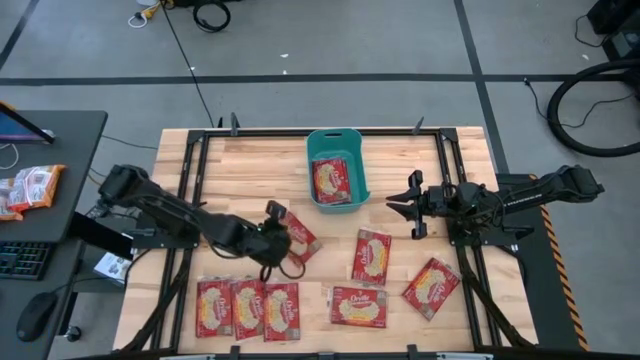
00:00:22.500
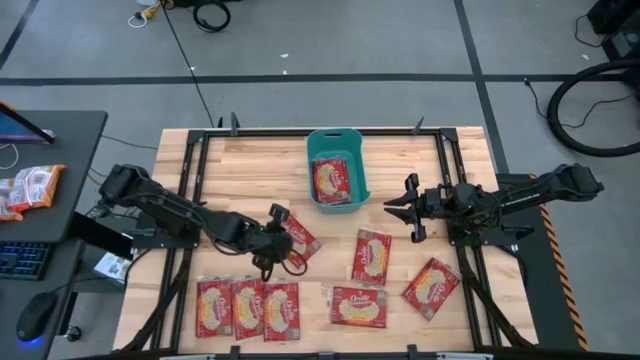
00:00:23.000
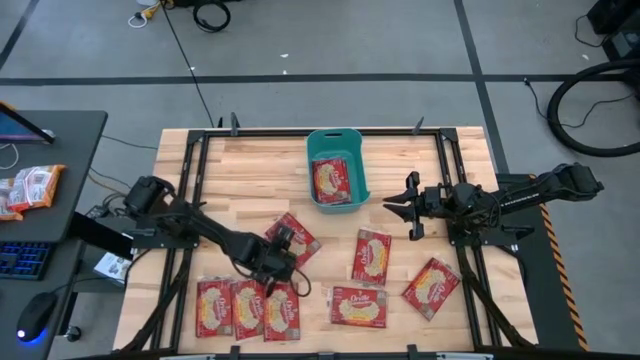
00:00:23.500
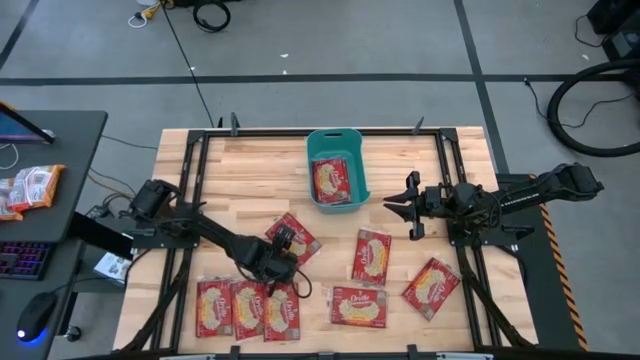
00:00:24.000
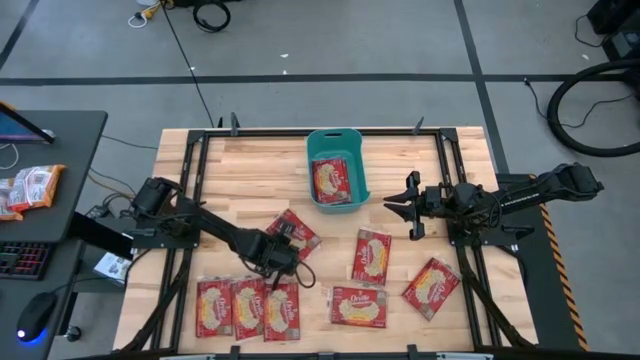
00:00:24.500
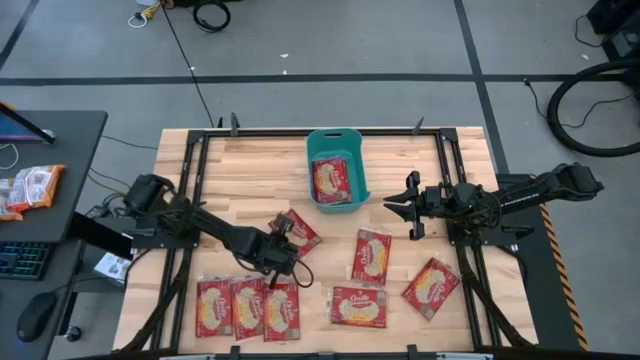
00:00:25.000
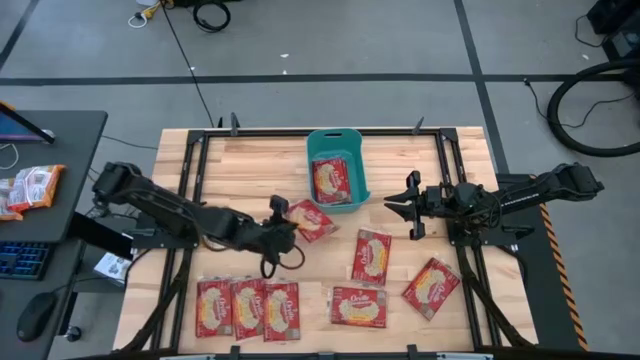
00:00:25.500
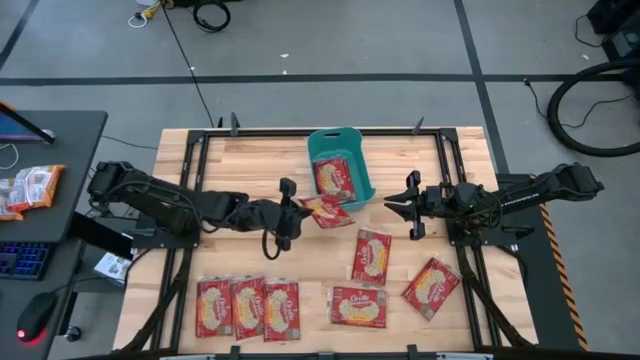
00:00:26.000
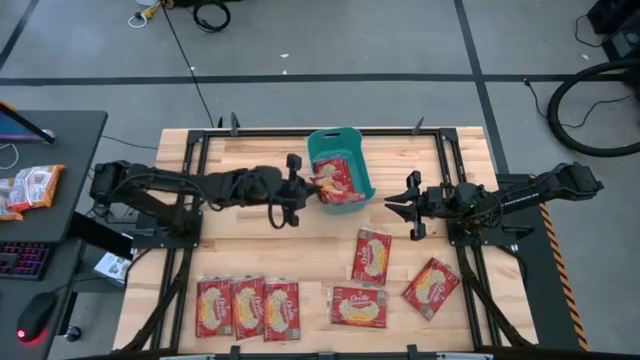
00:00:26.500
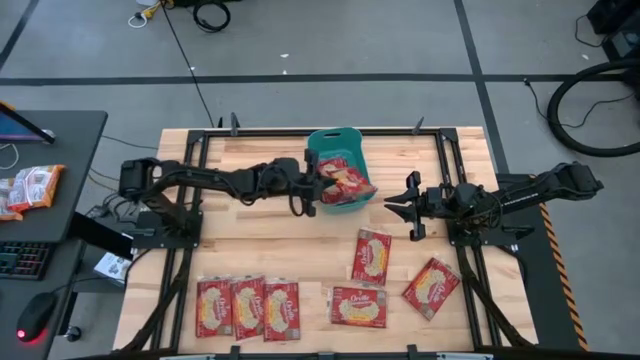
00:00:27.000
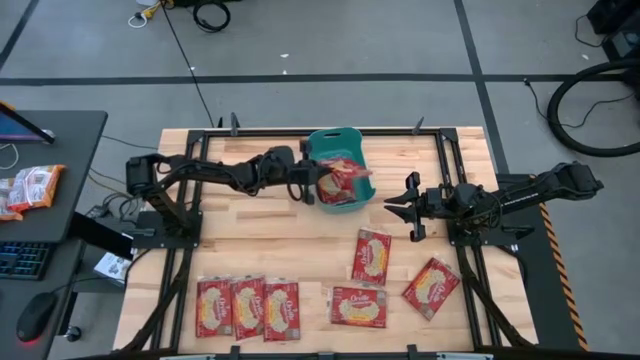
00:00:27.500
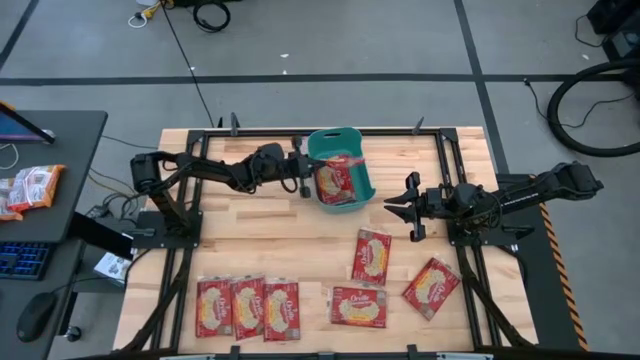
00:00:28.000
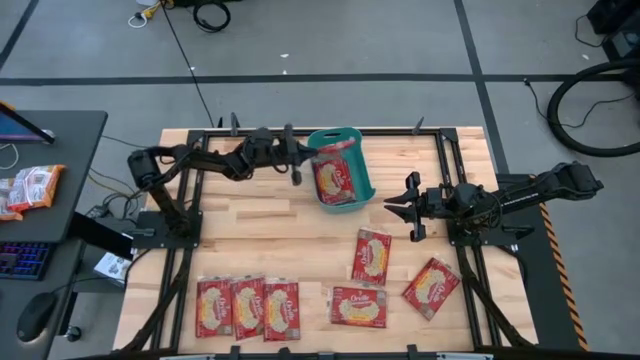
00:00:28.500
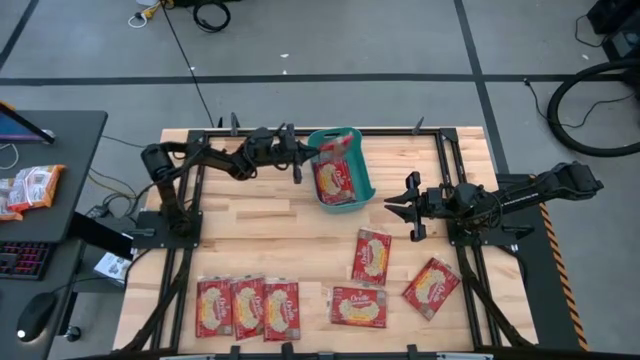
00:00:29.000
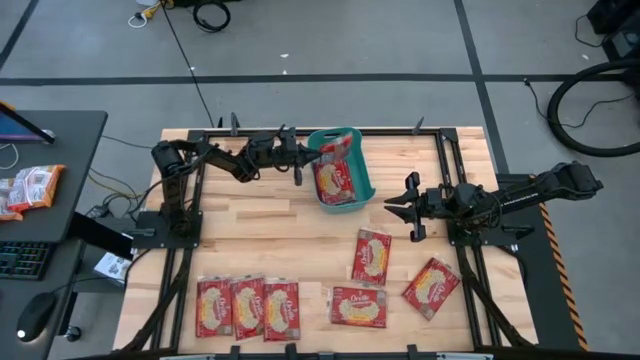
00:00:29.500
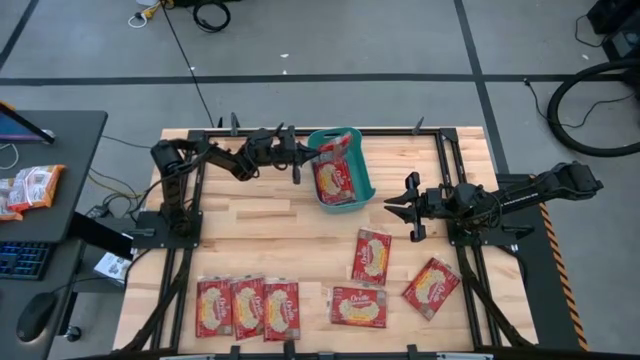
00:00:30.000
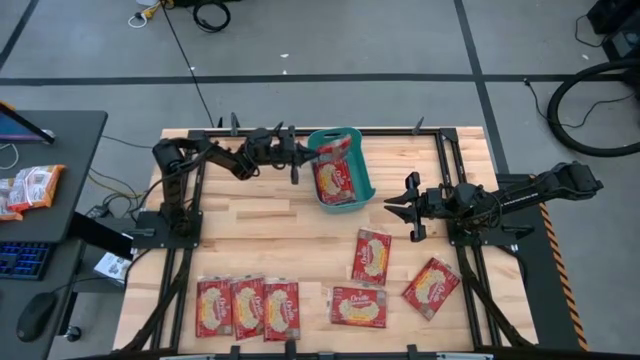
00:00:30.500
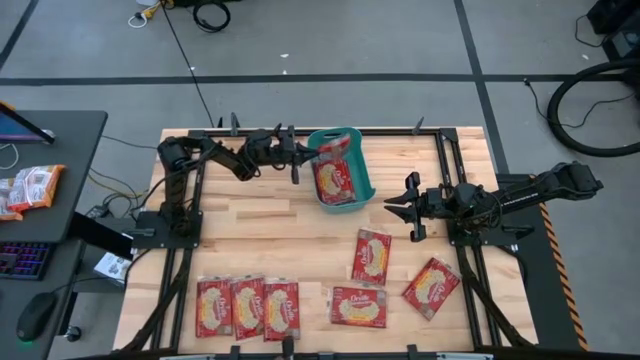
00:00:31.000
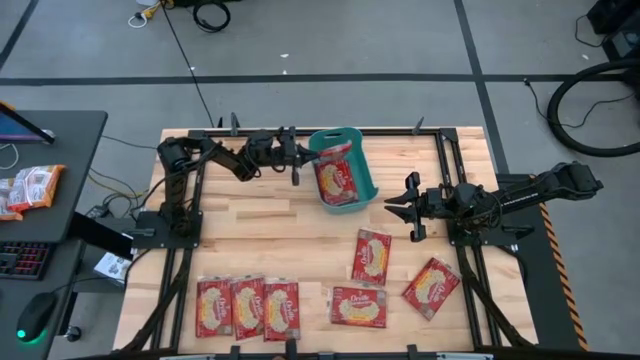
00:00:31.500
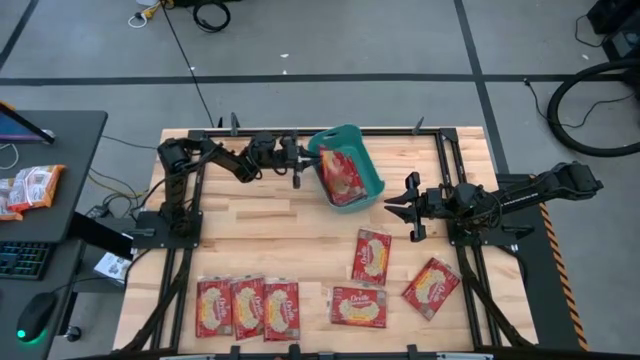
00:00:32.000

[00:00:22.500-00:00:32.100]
Task: Sort popcorn bags into baskets
Put the red popcorn bag into the green bin

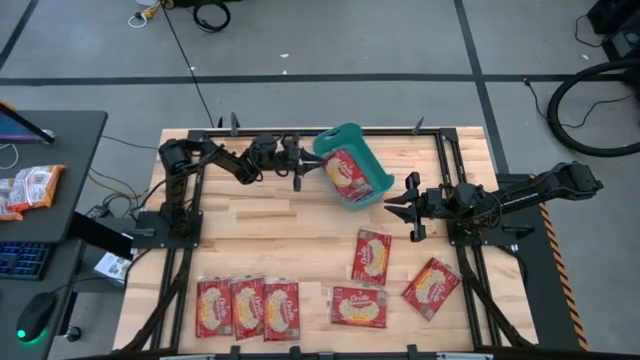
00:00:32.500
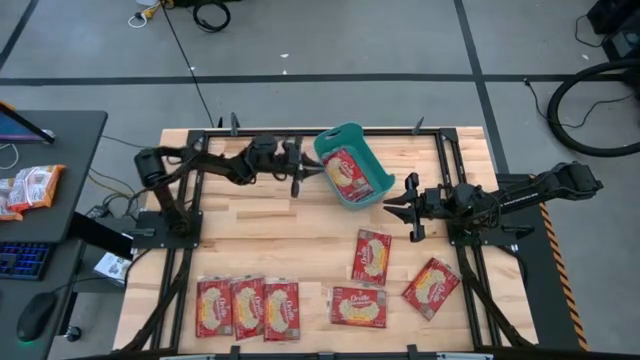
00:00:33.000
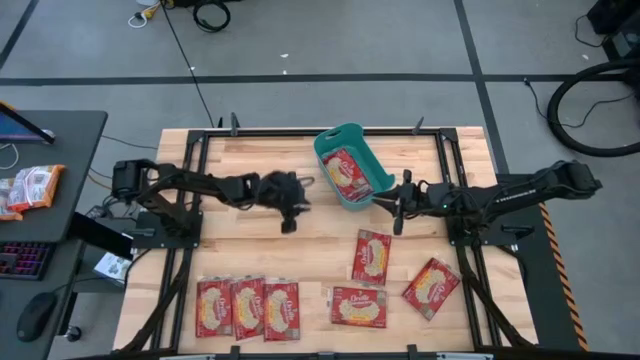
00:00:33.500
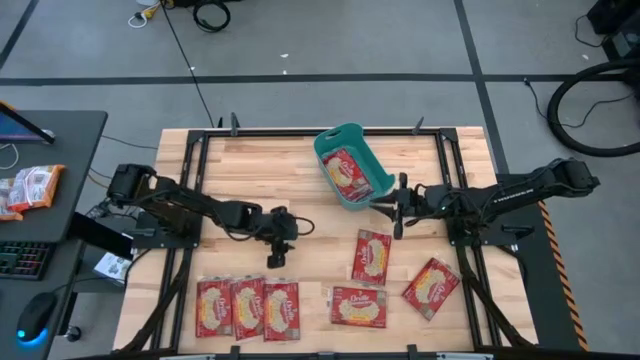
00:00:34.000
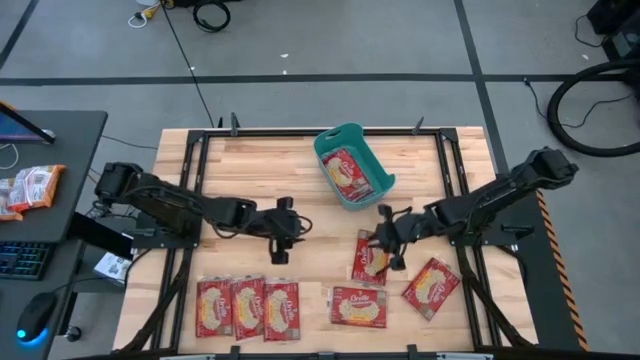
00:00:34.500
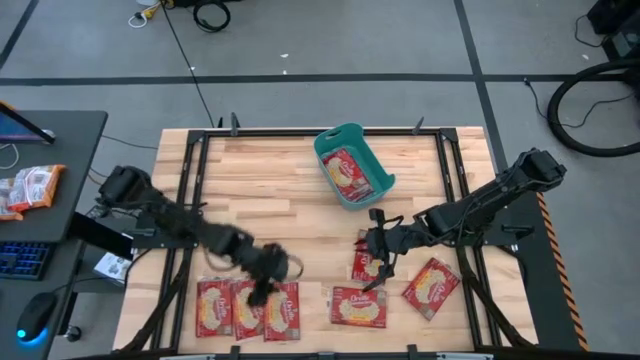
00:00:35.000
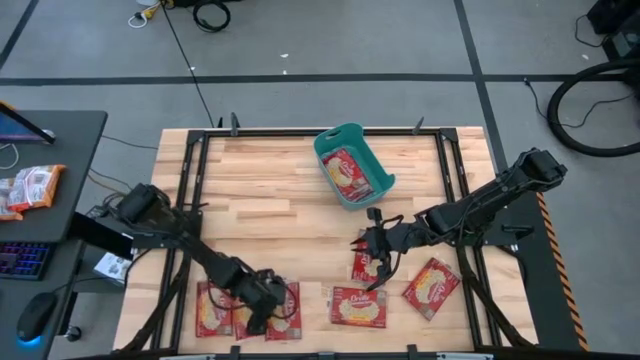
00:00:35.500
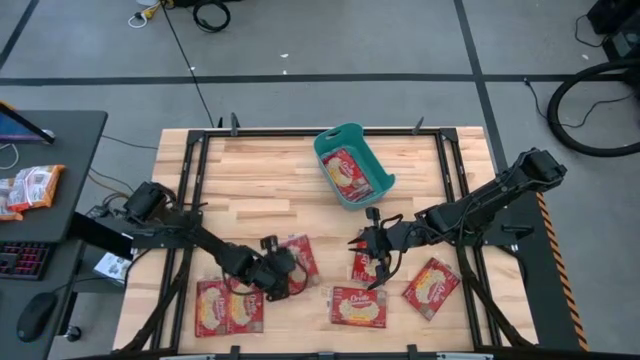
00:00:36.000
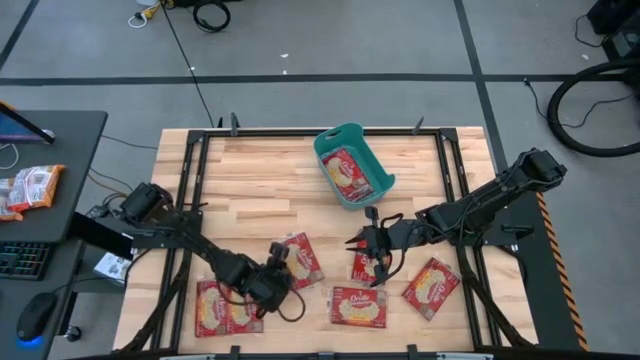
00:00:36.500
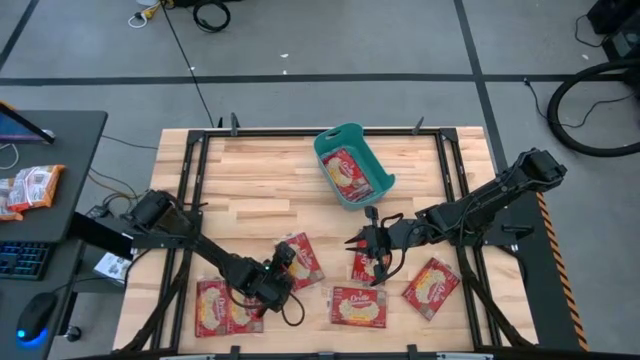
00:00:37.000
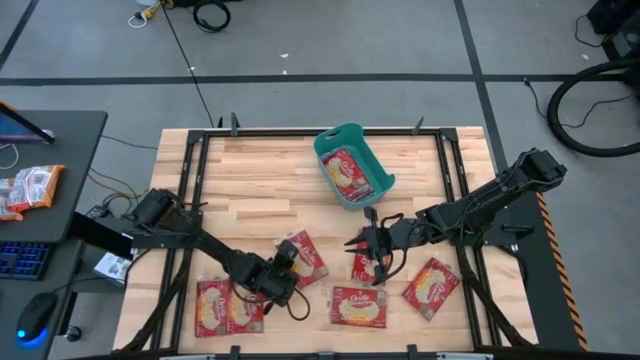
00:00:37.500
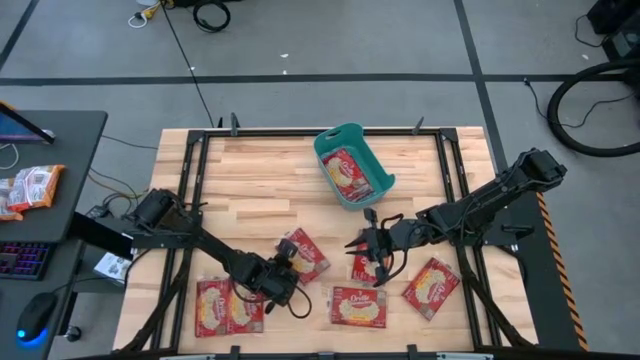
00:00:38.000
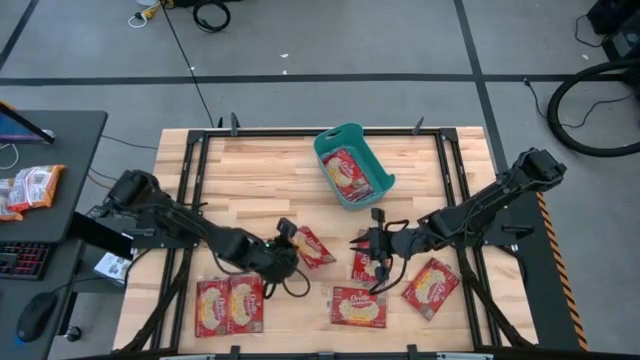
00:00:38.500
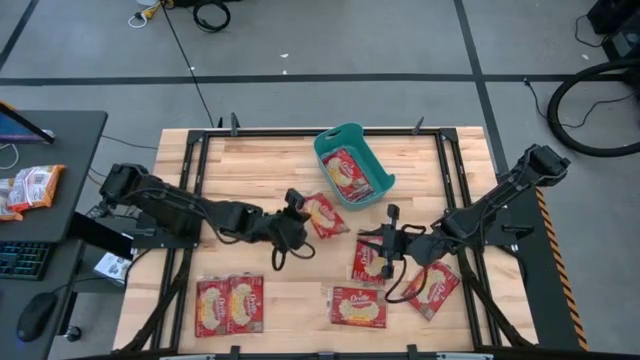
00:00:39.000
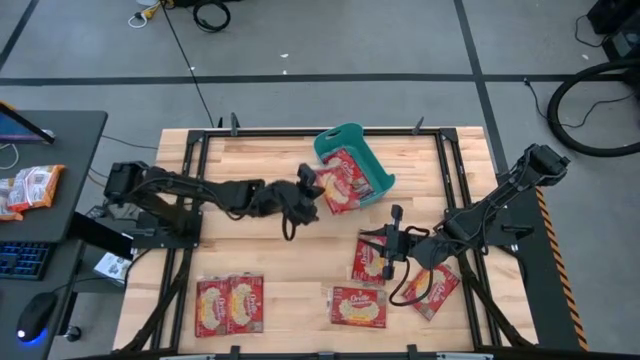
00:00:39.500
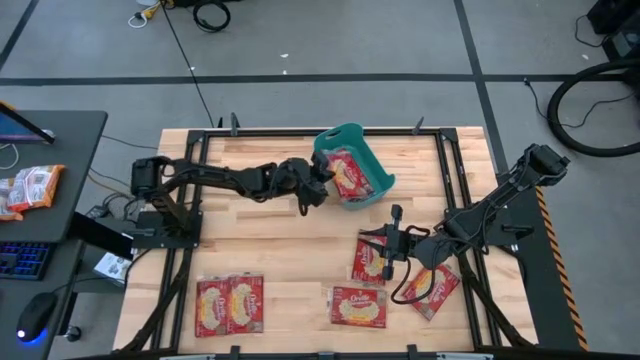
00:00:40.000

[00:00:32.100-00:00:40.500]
Put the red popcorn bag into the green bin

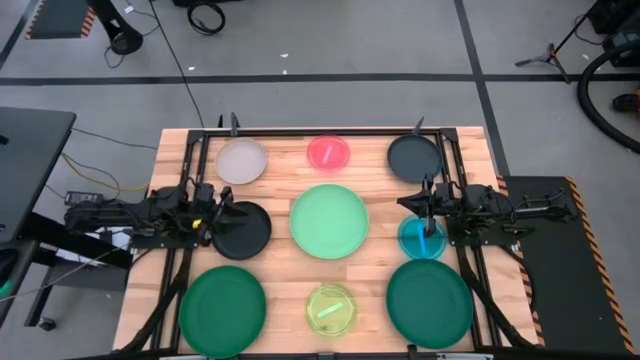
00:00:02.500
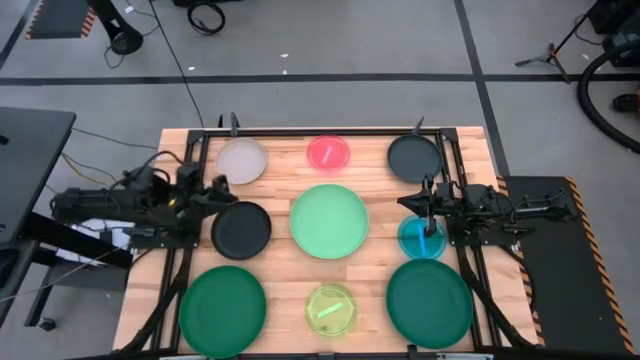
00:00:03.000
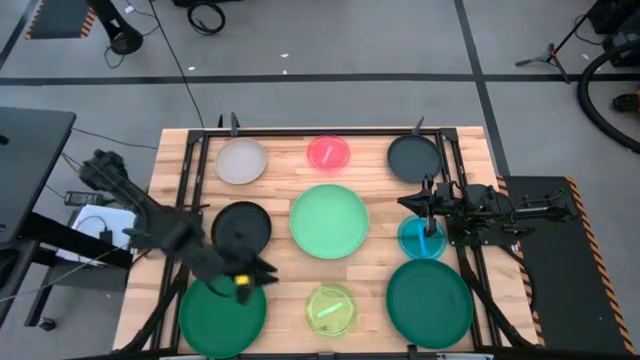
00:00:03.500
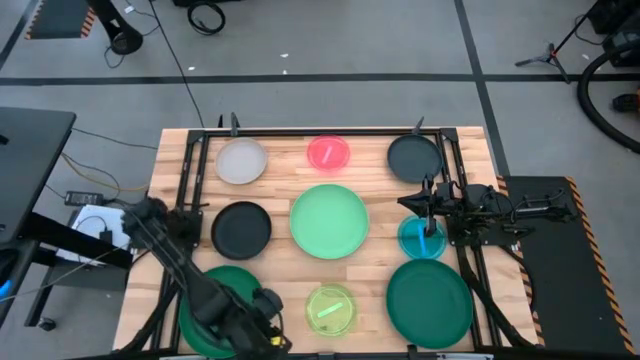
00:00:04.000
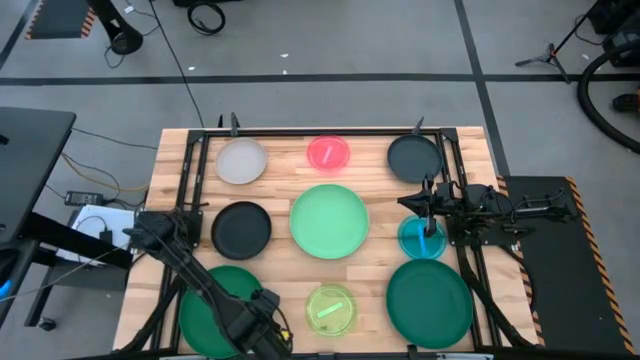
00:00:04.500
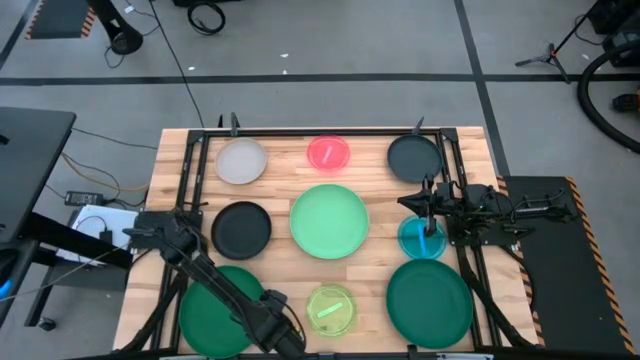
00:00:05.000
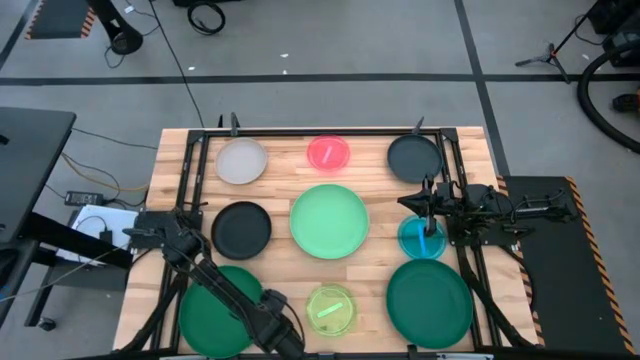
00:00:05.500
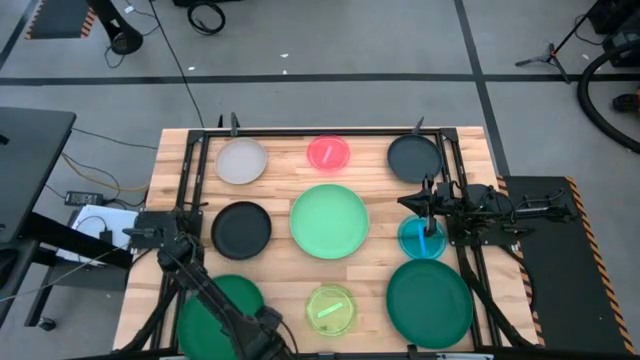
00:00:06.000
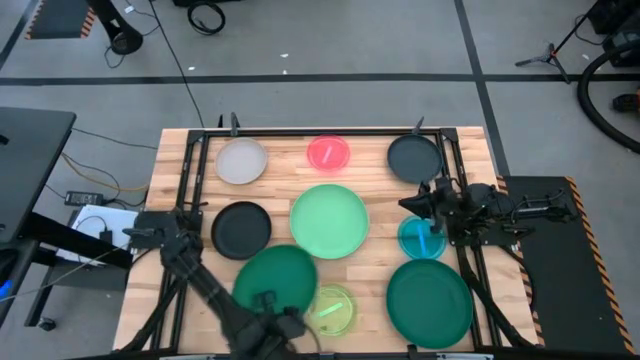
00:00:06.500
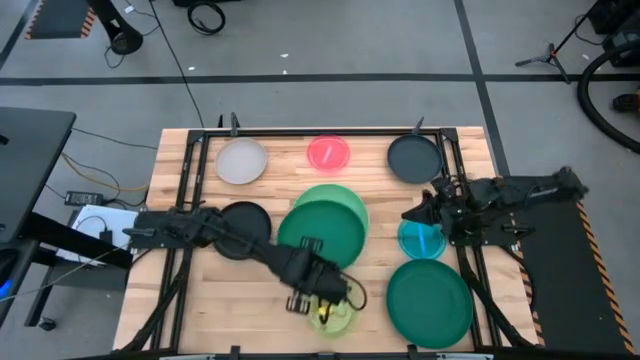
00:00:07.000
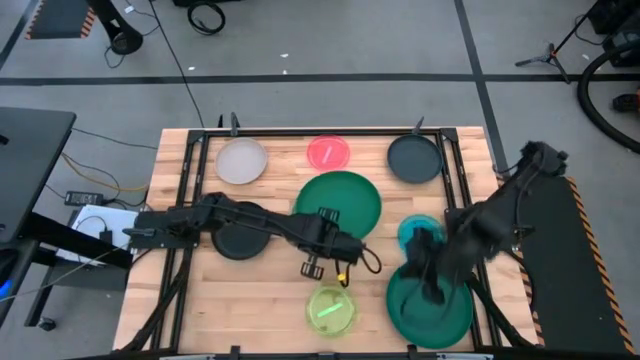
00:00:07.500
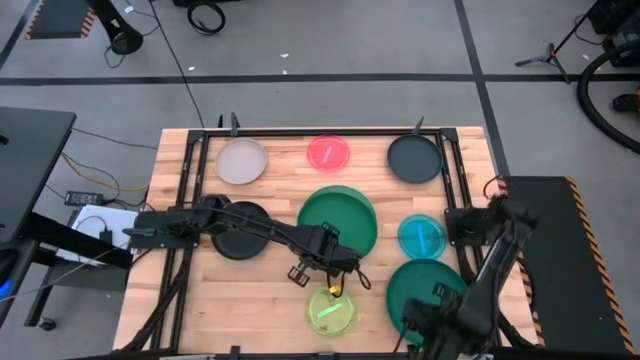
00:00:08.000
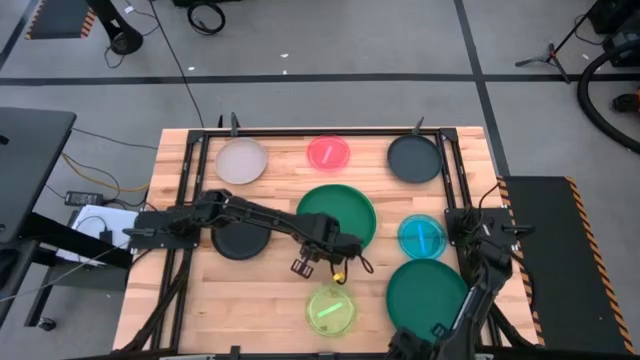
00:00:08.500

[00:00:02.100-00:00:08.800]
Task: Stack plastic plates
Stack the left dark green plate on top of the light green plate
